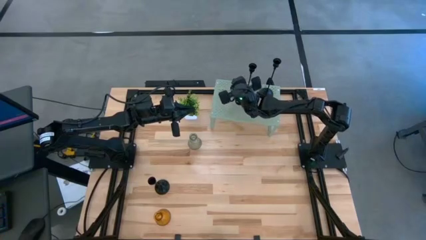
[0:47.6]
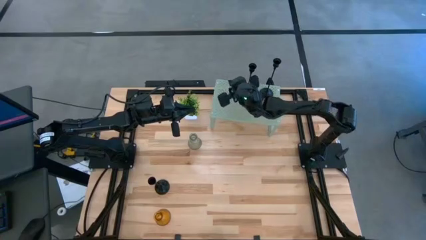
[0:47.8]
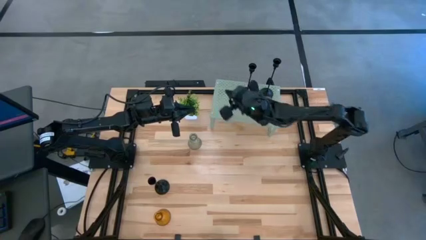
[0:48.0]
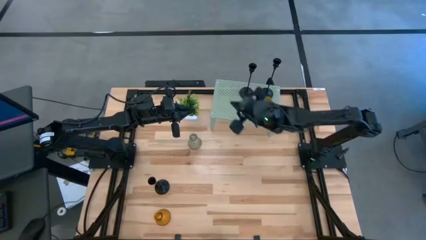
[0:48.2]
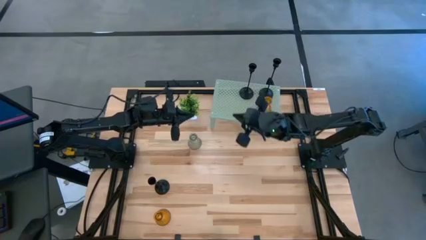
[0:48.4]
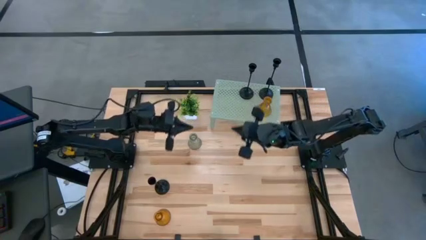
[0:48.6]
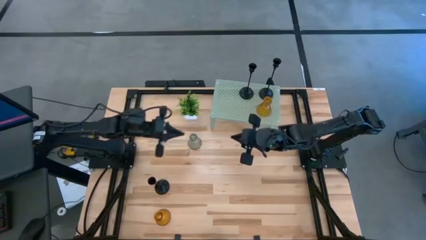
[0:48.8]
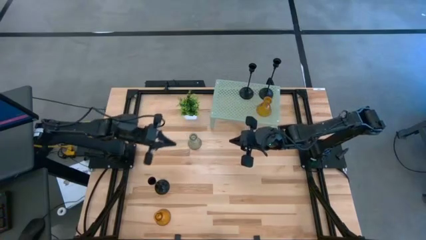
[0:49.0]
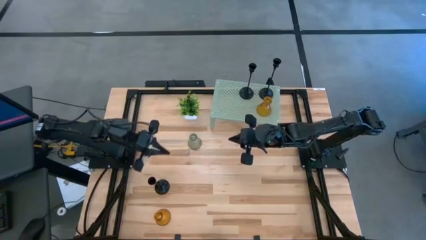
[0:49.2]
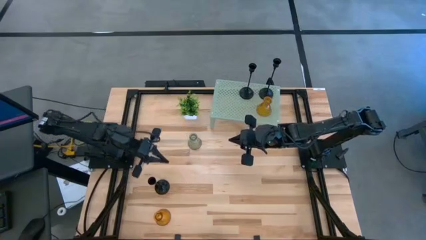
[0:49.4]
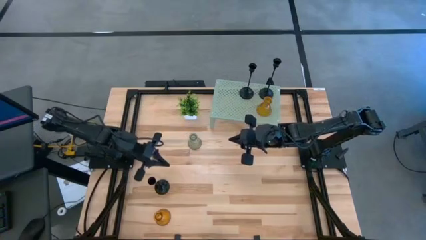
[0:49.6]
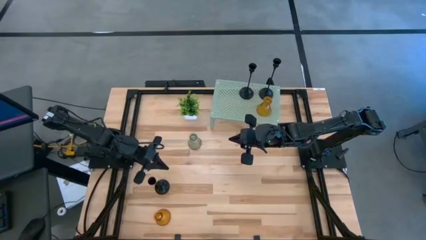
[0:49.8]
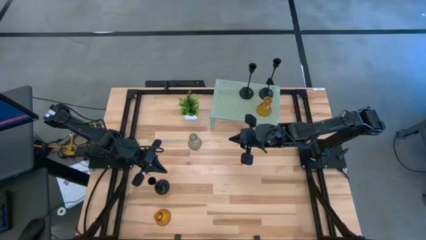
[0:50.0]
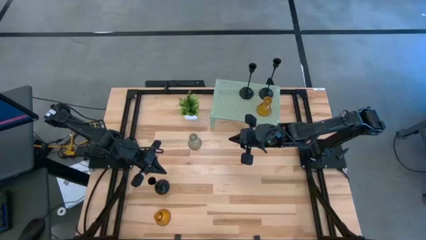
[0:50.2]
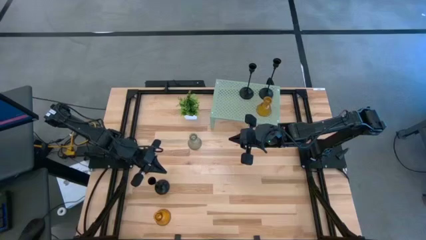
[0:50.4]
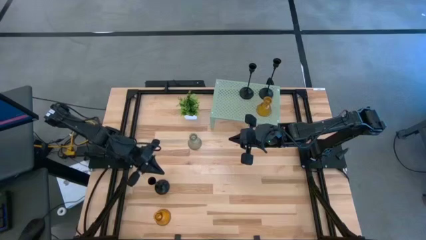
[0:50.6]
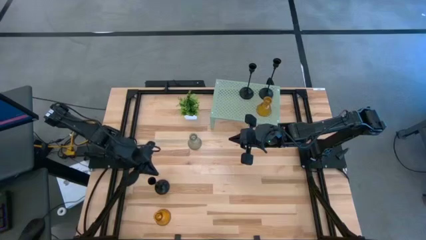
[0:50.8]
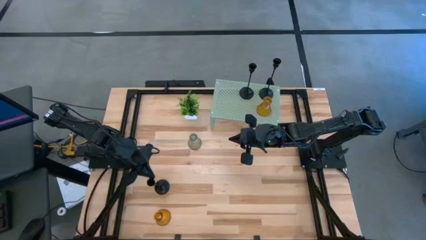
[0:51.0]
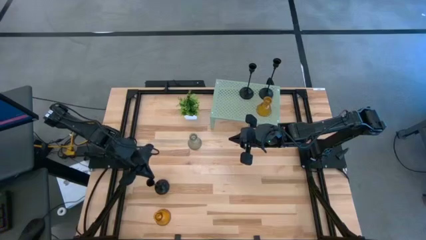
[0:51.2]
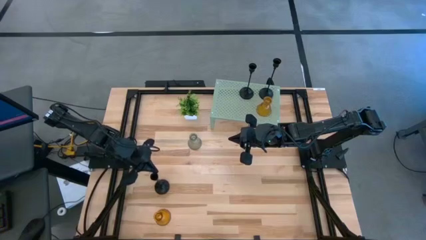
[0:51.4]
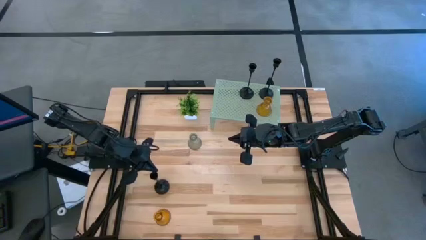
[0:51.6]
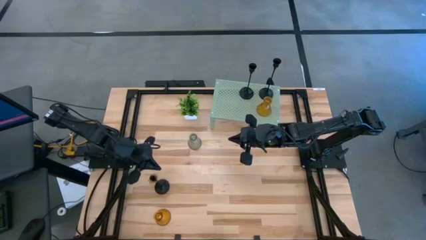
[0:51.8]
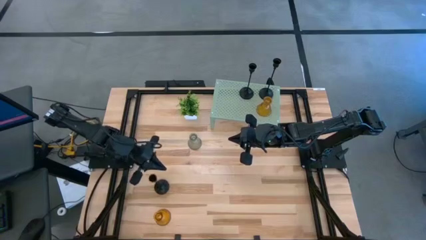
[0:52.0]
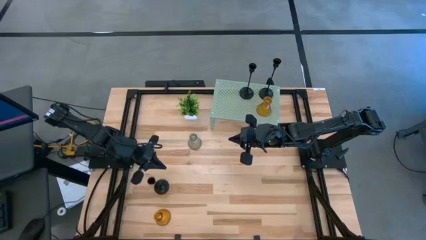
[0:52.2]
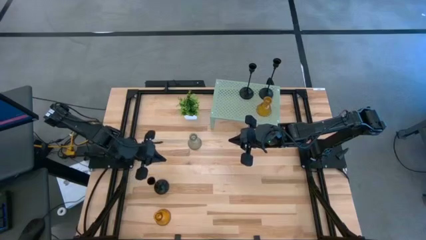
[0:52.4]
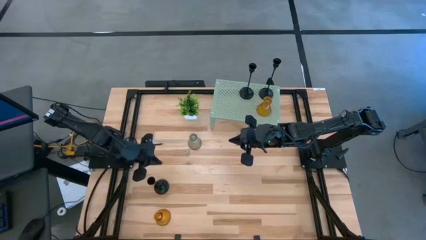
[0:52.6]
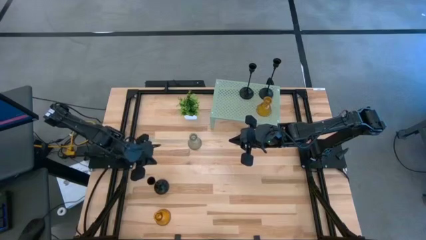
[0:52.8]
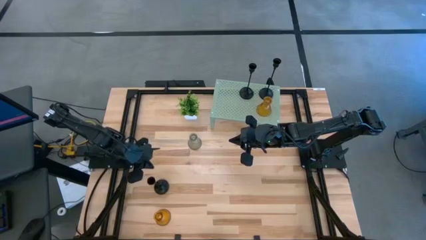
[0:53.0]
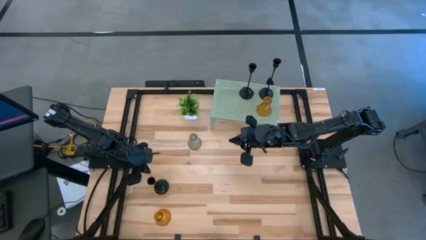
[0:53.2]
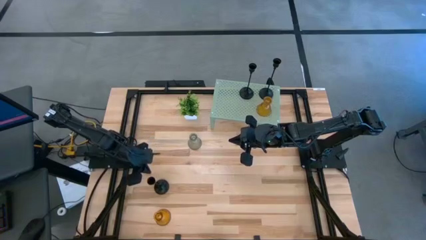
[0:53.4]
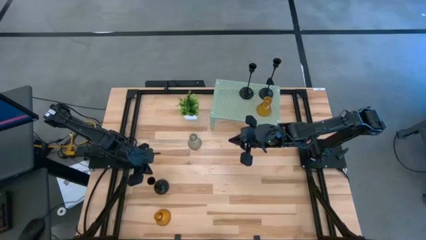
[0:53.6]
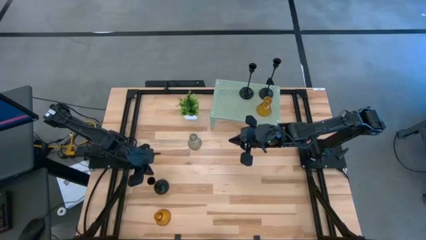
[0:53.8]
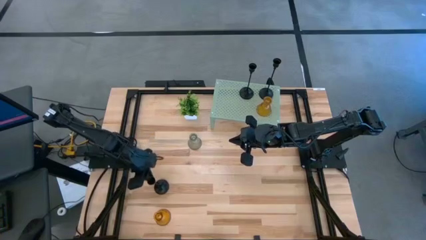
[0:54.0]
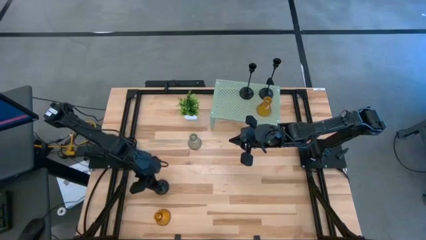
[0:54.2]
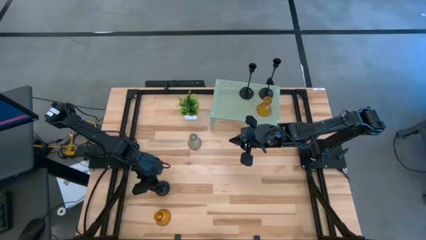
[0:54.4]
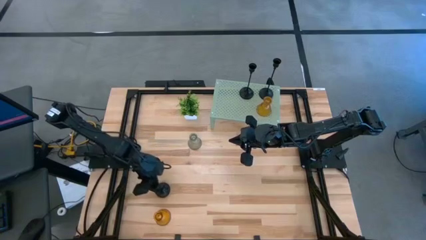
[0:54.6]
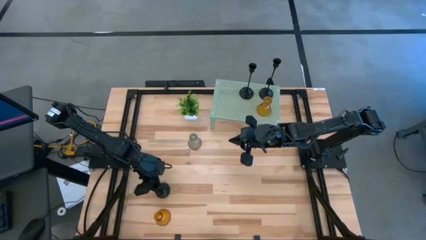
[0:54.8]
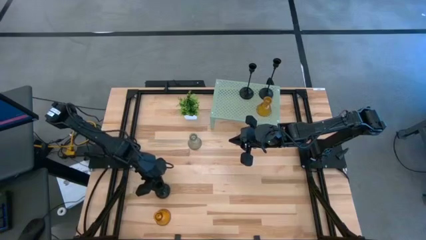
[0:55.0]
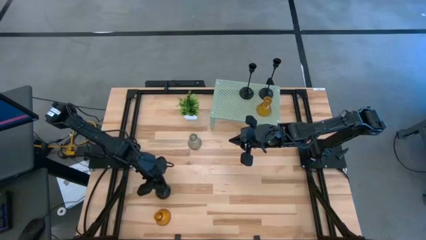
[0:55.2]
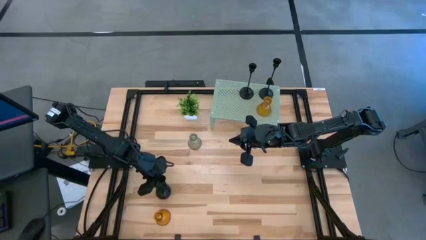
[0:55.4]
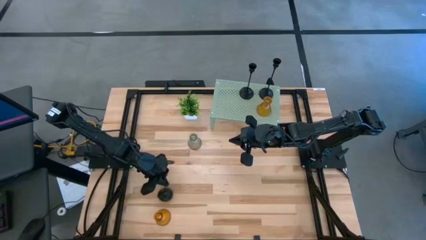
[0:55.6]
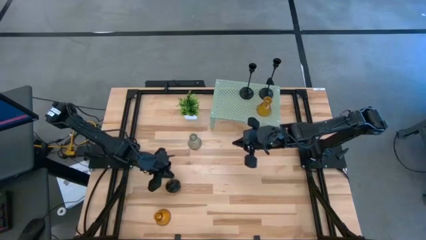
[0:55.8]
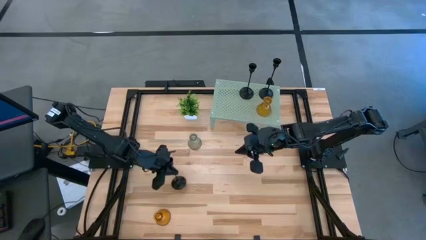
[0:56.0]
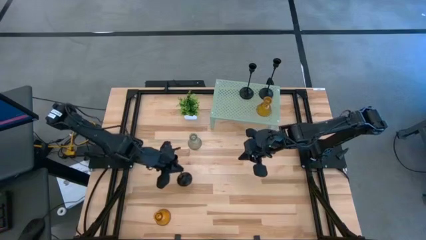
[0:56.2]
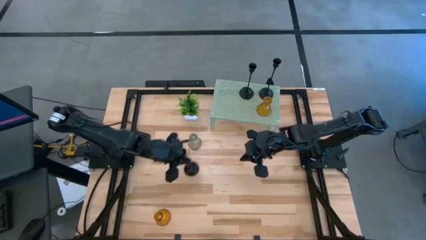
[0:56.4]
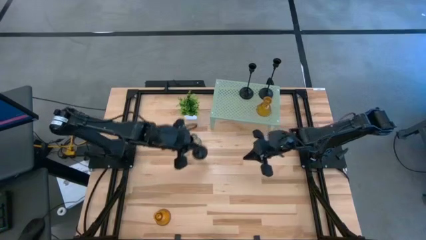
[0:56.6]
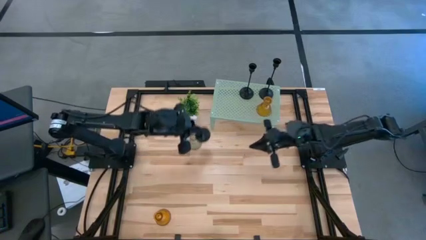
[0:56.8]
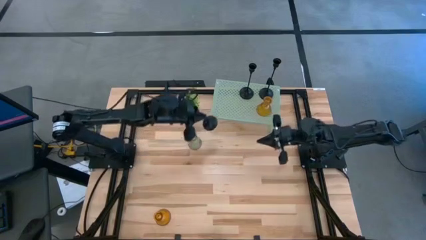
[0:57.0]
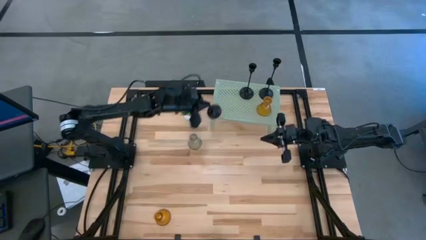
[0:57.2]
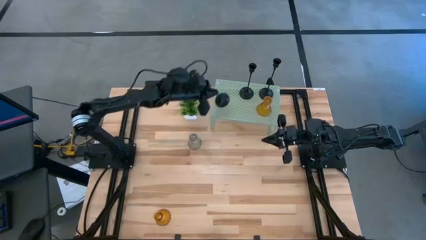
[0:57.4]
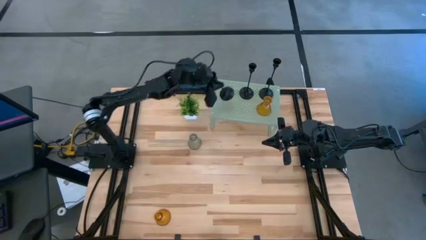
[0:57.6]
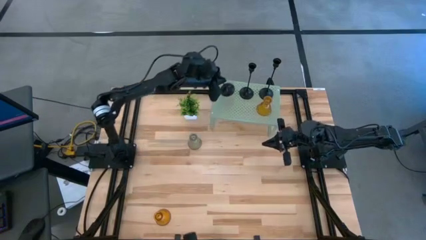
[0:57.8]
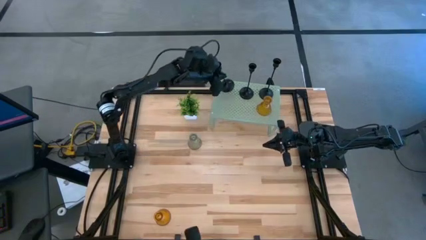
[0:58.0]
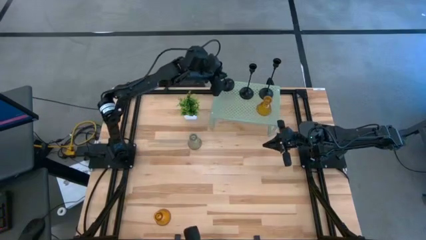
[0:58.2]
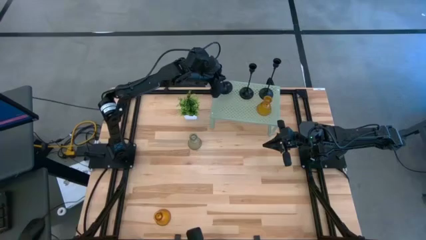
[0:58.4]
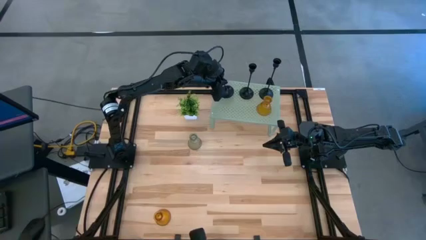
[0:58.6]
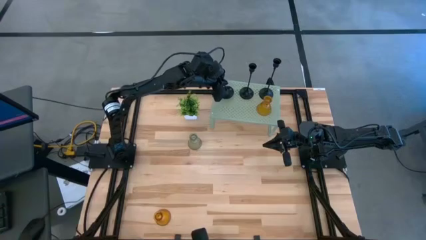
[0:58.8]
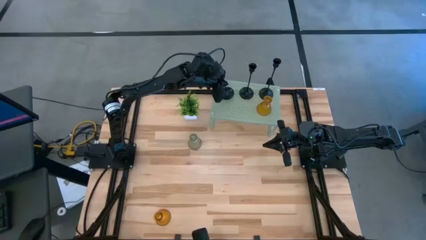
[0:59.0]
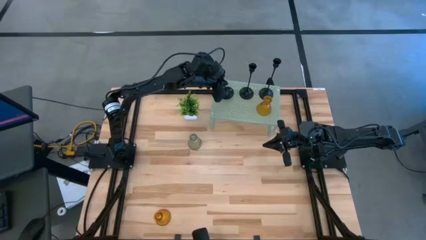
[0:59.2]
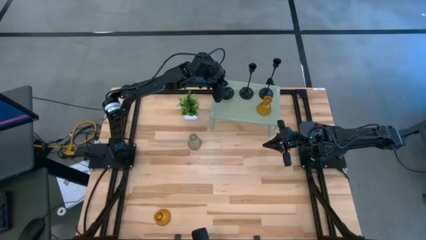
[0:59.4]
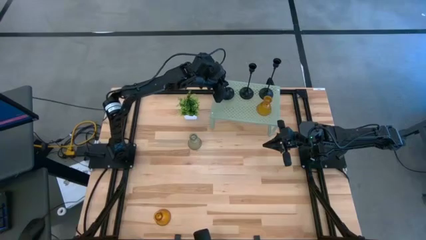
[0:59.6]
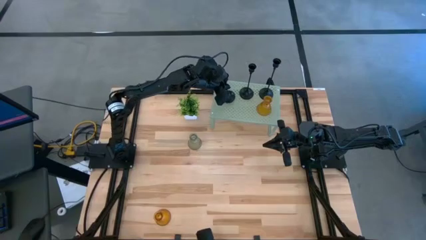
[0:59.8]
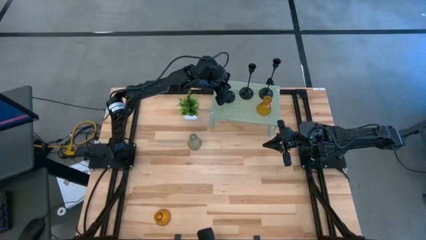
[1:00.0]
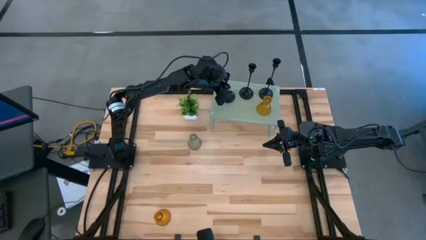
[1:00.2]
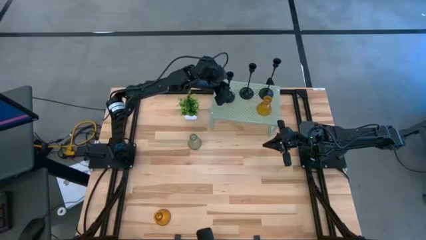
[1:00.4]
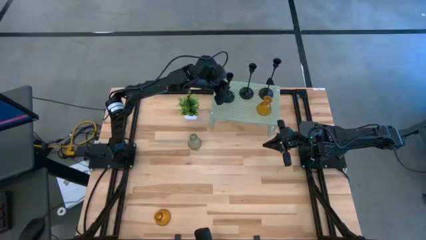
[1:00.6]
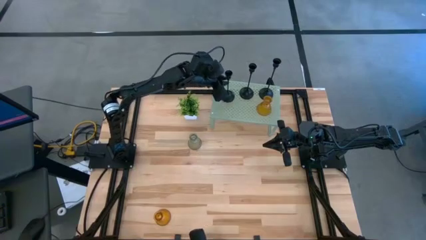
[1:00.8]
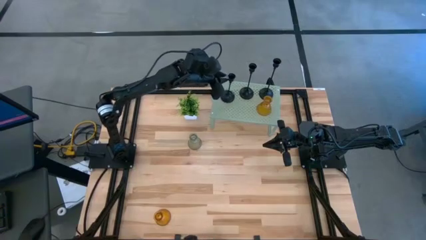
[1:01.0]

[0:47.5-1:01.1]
Task: Pick & Place candle stick holders
Put the middle black metal candle holder on the shelf

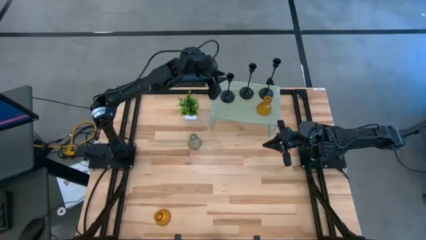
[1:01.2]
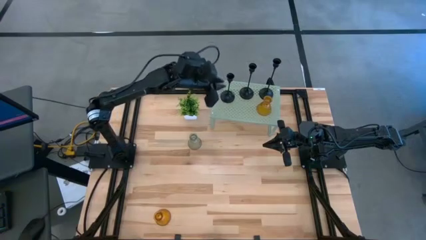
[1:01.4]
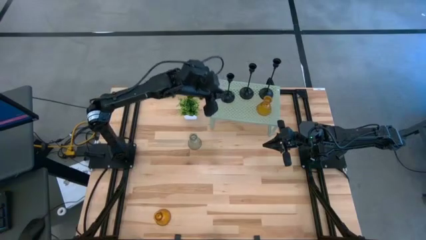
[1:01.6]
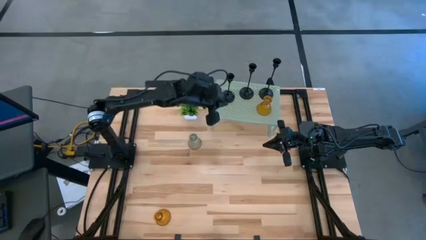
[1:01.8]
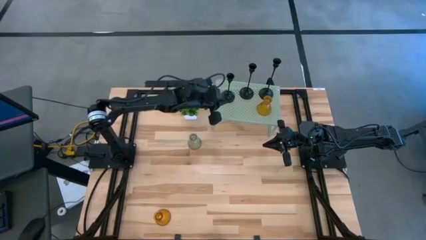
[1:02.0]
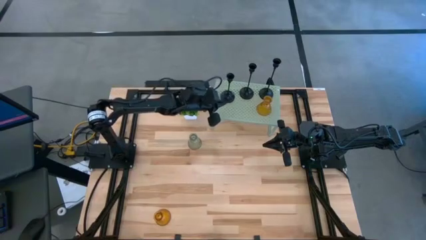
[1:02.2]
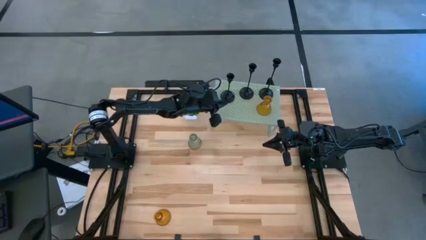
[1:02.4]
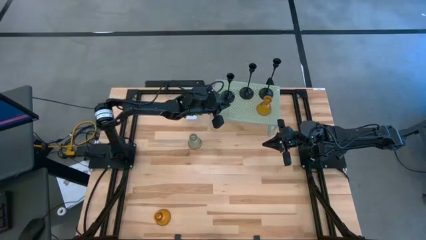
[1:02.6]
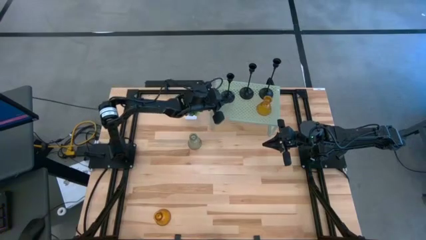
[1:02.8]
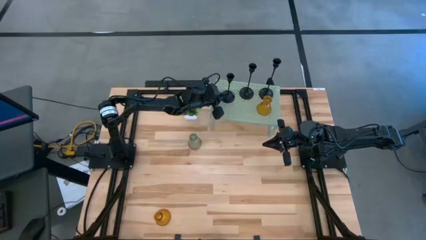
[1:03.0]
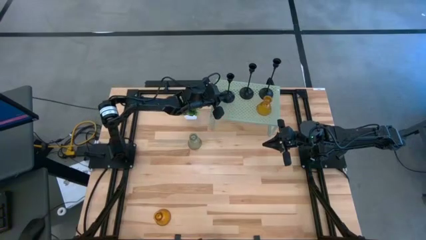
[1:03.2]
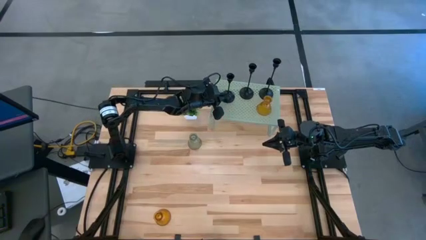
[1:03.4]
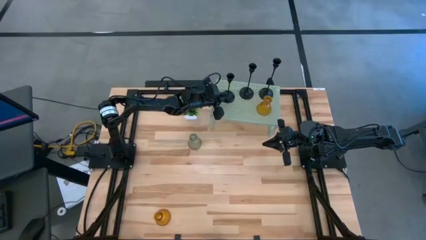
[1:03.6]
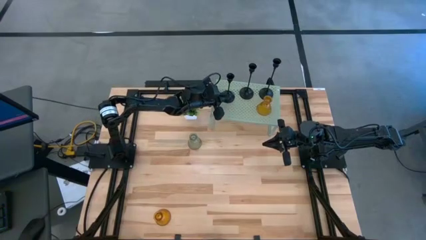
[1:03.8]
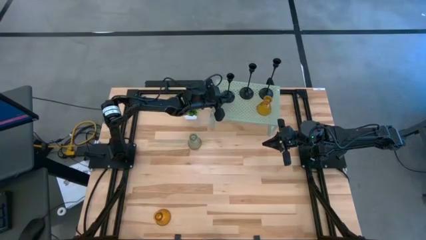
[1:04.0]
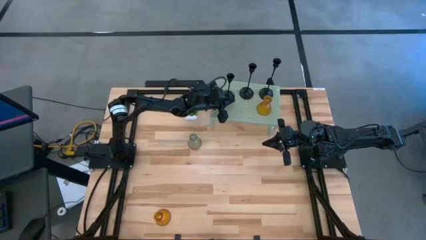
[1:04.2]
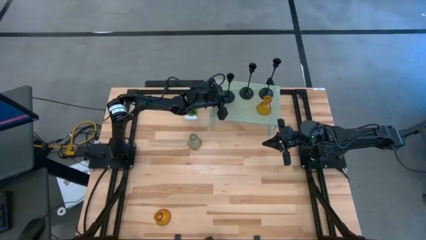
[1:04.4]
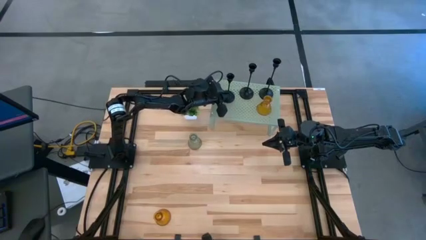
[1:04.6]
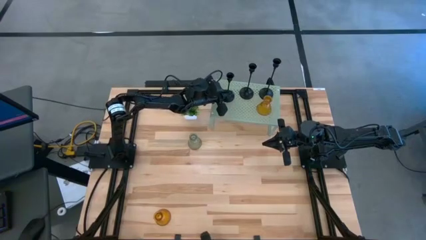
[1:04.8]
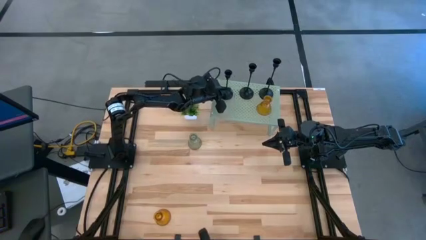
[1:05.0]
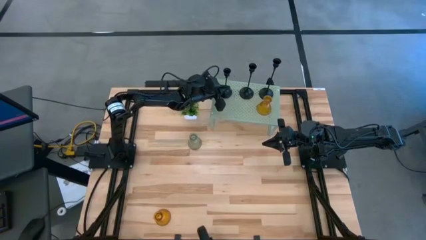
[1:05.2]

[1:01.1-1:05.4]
Adjust the black metal candle holder on the shelf
